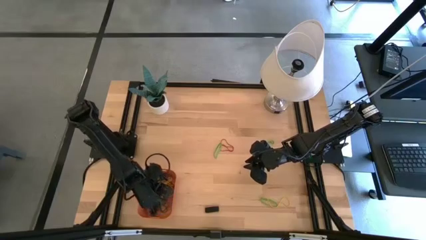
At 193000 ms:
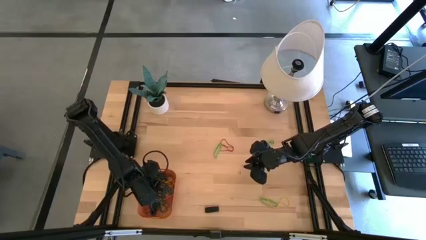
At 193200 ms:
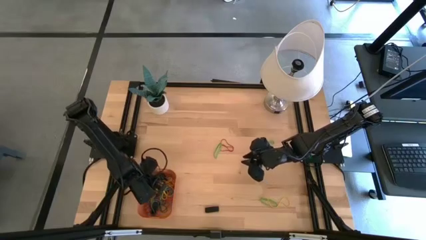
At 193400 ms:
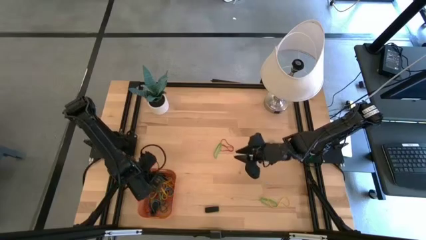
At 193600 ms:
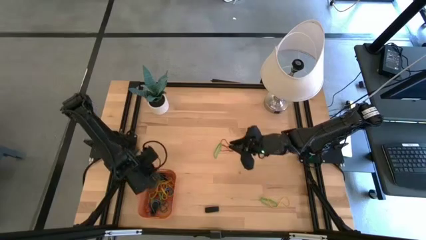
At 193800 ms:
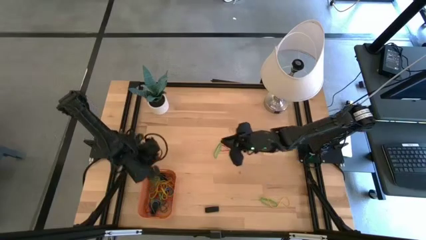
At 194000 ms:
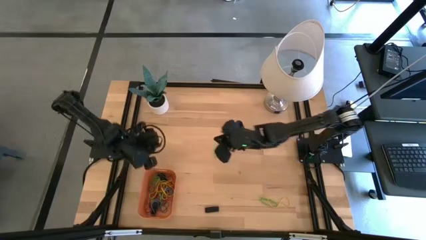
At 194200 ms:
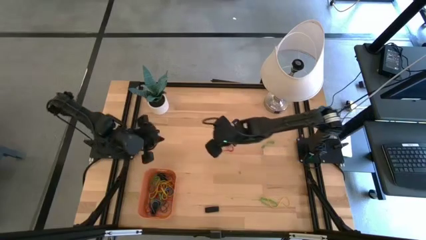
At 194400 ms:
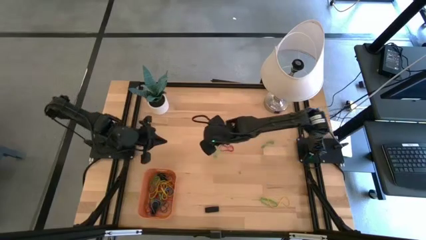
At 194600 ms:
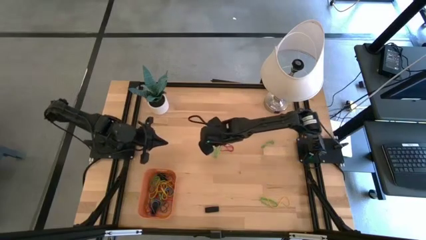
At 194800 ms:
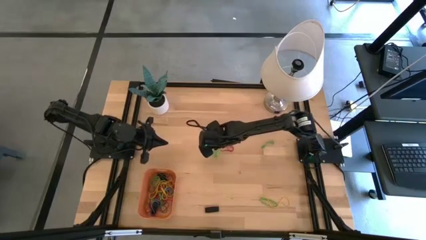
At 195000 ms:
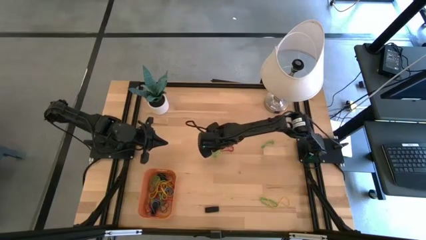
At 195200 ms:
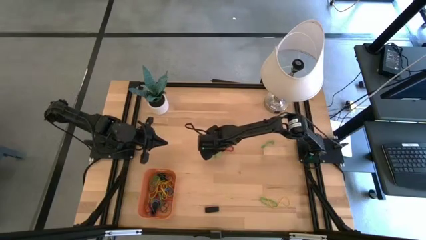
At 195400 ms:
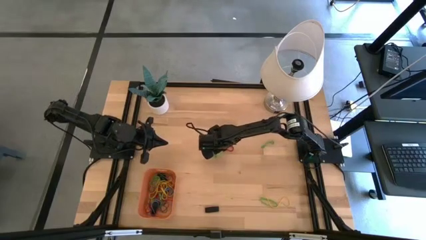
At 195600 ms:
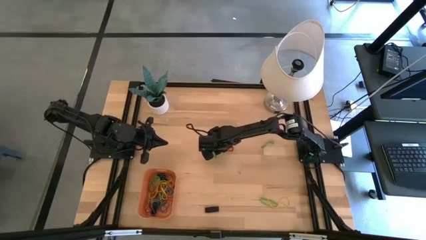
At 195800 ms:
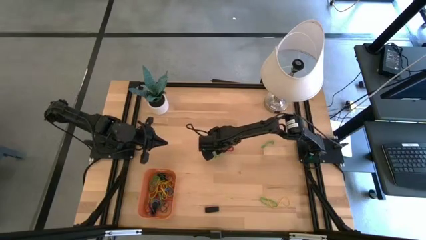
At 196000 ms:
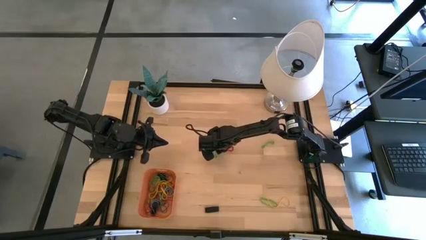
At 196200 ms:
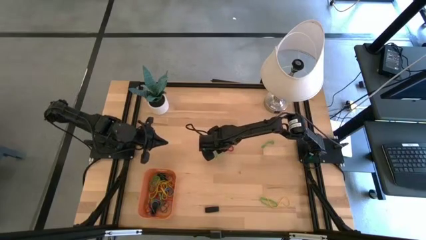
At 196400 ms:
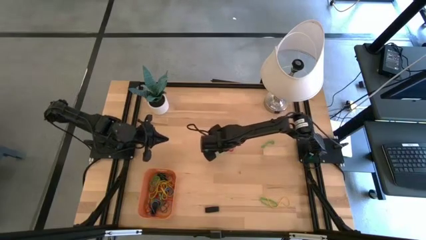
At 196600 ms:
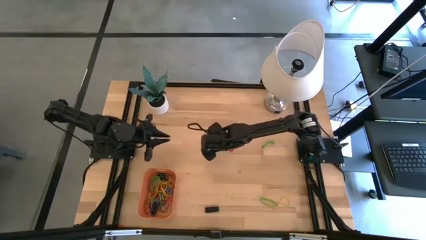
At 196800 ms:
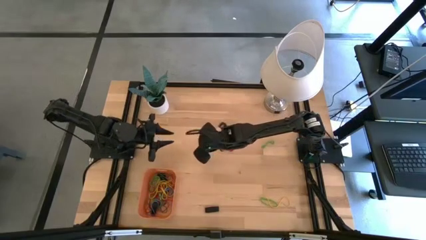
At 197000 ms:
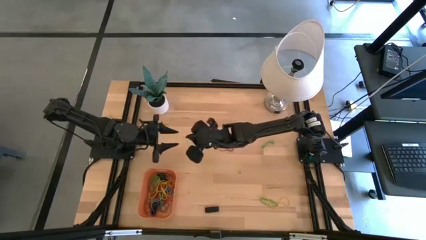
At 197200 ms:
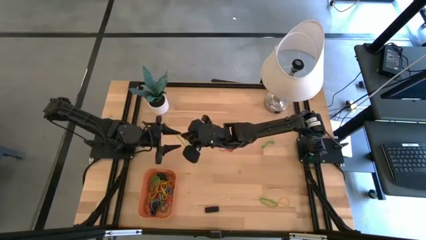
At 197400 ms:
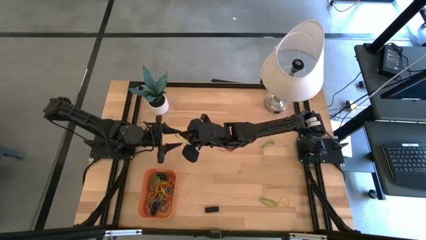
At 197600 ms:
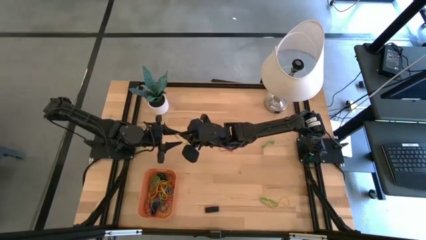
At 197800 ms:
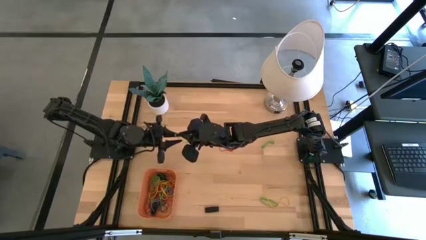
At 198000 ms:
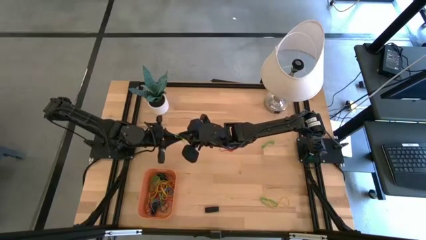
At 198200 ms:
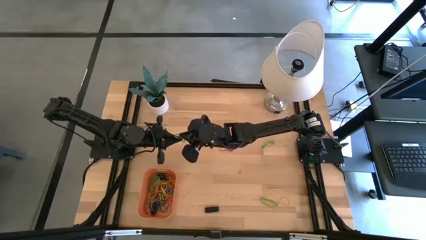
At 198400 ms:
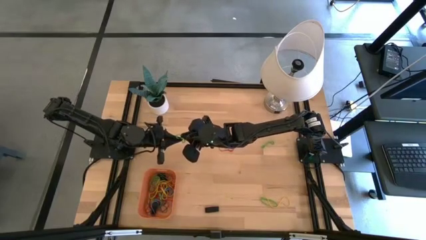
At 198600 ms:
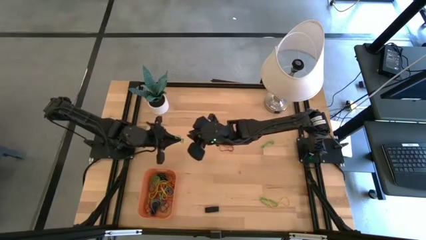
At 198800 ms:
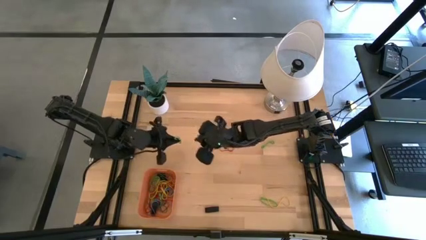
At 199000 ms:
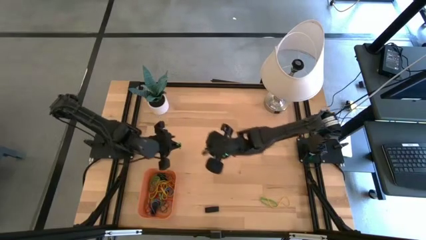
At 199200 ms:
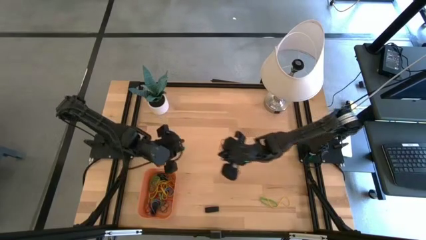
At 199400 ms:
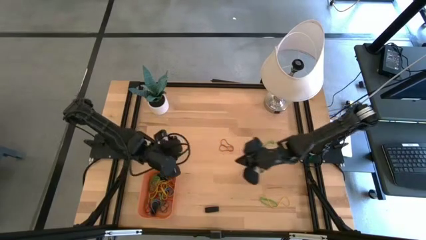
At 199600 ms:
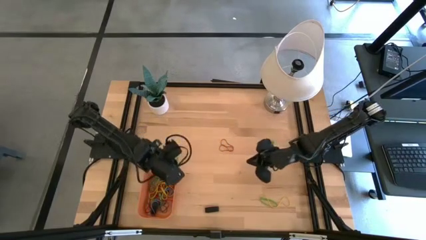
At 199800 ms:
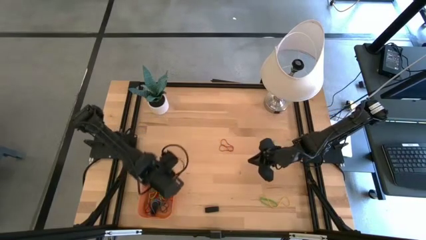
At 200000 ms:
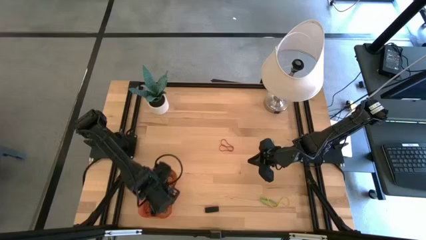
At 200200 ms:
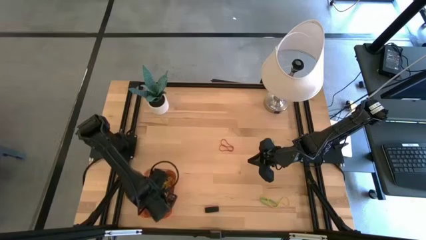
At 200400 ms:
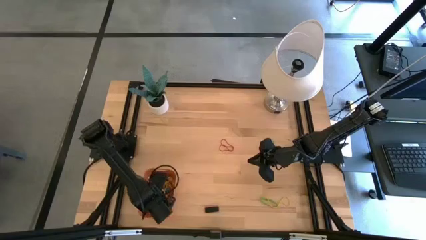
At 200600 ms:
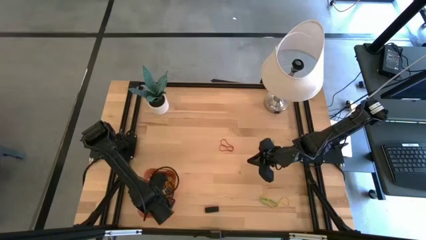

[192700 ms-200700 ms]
Task: Pick and place rubber bands into bin
Put the green rubber band into the orange bin

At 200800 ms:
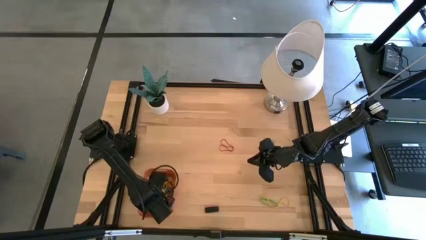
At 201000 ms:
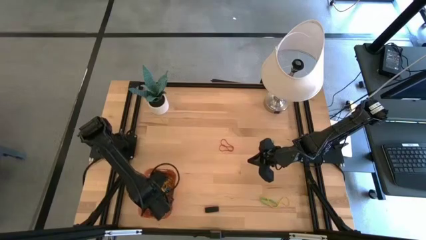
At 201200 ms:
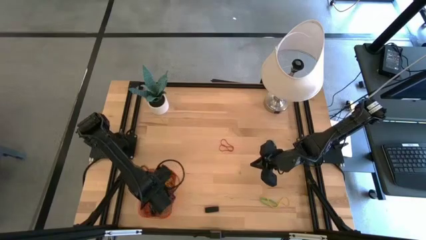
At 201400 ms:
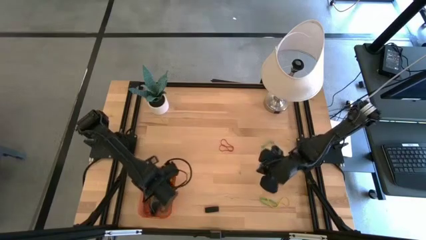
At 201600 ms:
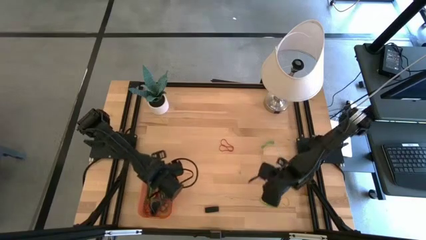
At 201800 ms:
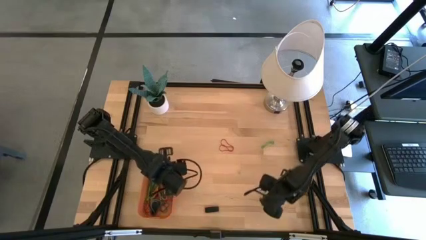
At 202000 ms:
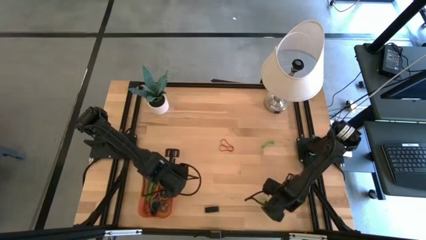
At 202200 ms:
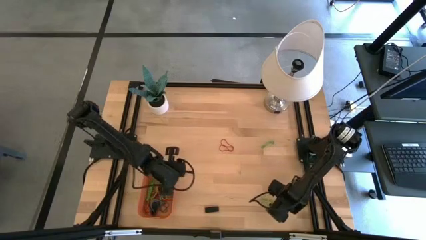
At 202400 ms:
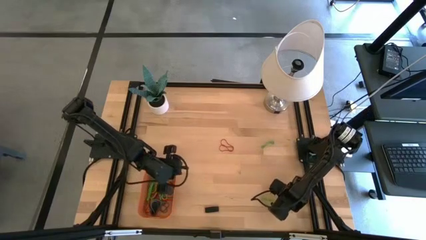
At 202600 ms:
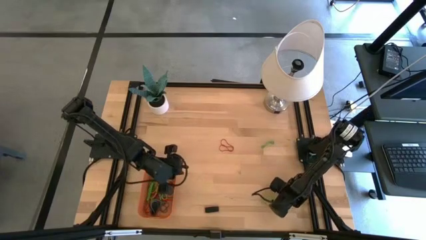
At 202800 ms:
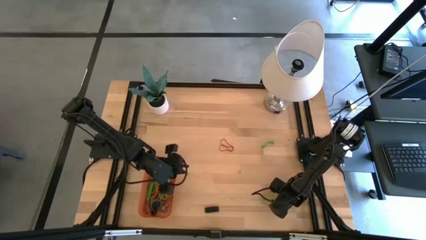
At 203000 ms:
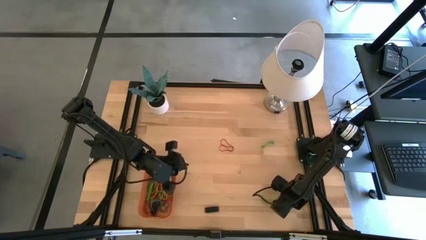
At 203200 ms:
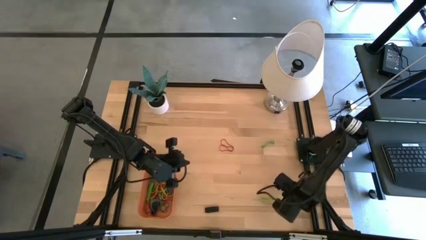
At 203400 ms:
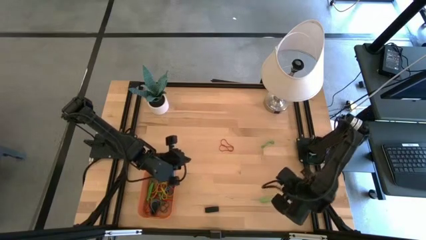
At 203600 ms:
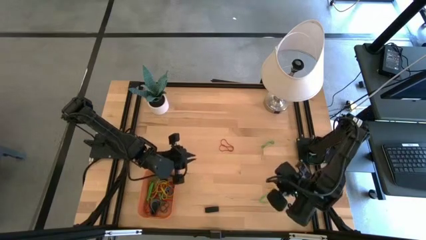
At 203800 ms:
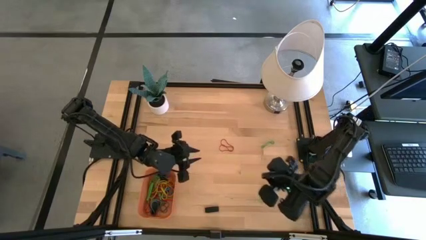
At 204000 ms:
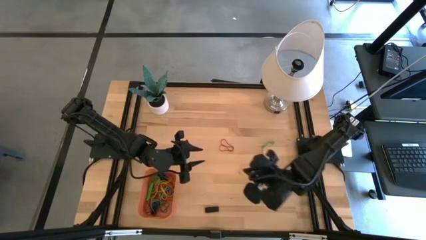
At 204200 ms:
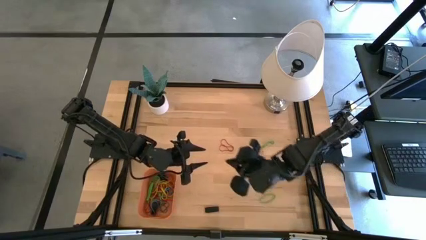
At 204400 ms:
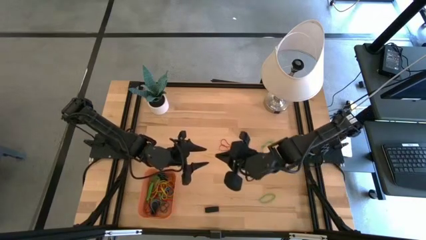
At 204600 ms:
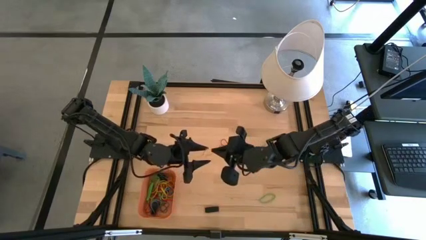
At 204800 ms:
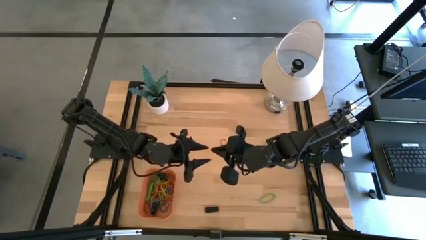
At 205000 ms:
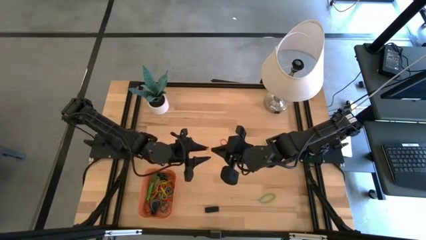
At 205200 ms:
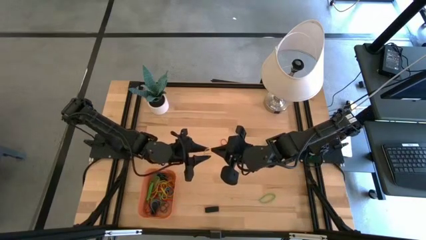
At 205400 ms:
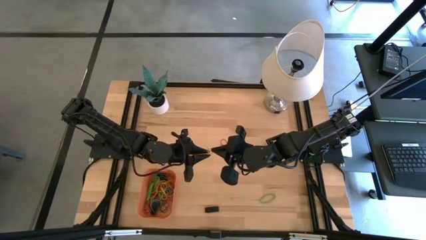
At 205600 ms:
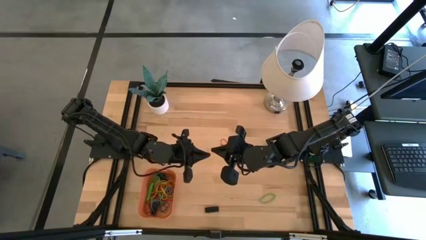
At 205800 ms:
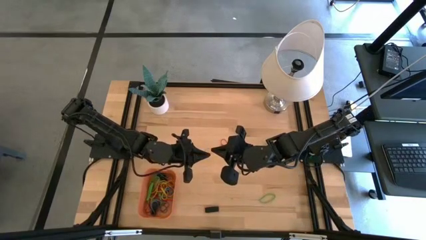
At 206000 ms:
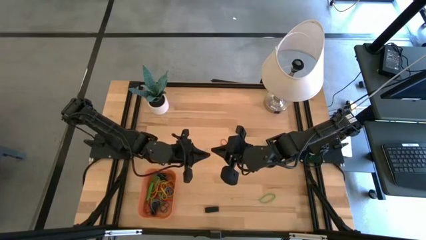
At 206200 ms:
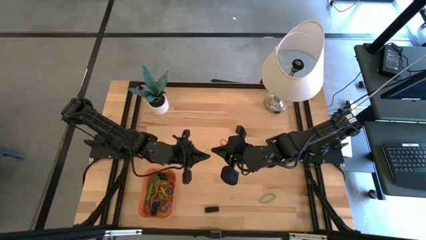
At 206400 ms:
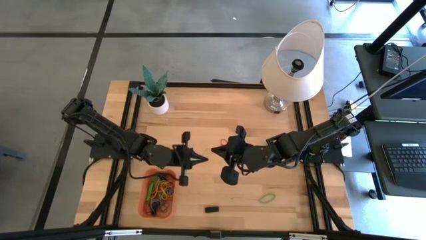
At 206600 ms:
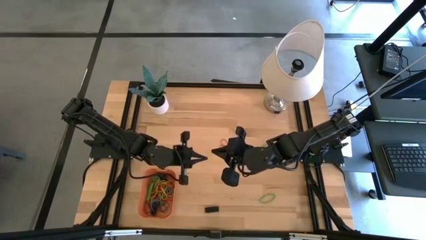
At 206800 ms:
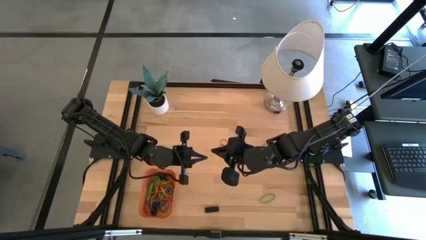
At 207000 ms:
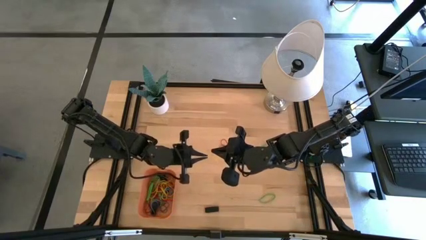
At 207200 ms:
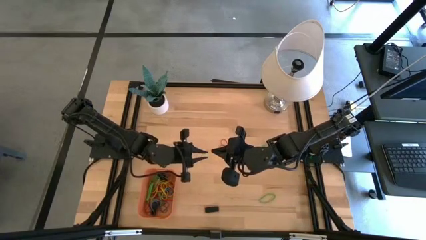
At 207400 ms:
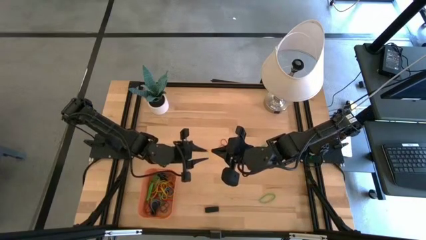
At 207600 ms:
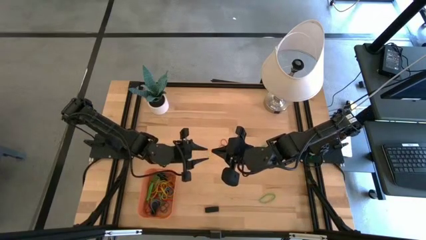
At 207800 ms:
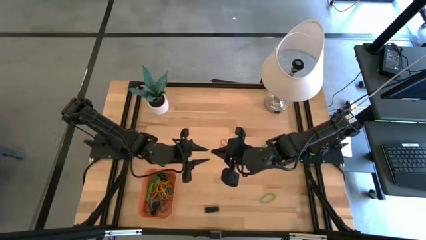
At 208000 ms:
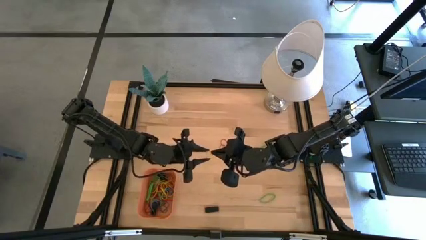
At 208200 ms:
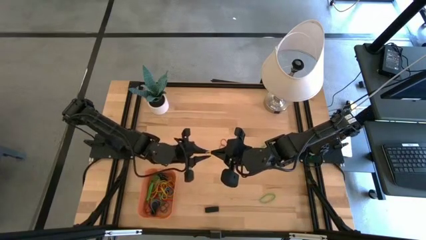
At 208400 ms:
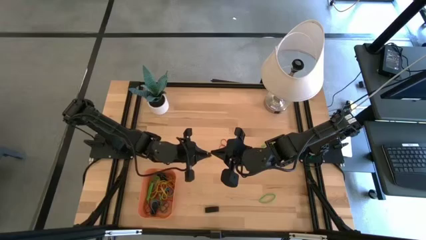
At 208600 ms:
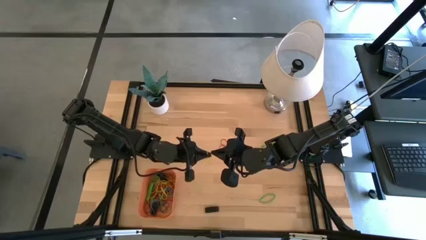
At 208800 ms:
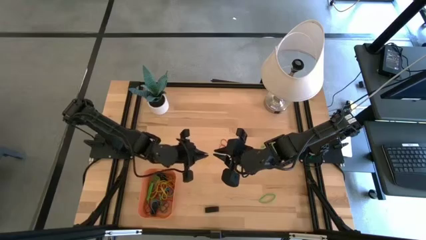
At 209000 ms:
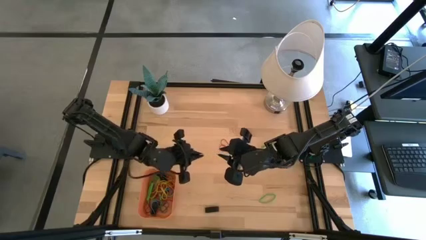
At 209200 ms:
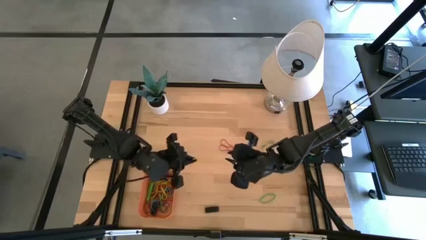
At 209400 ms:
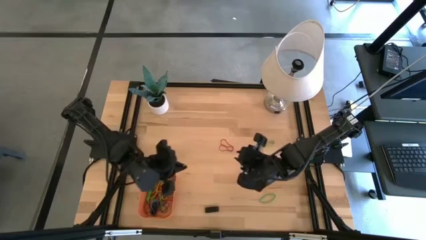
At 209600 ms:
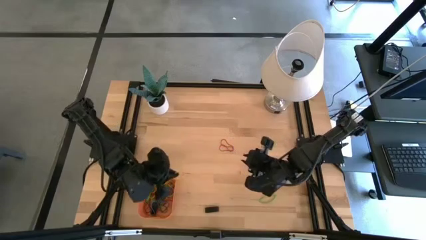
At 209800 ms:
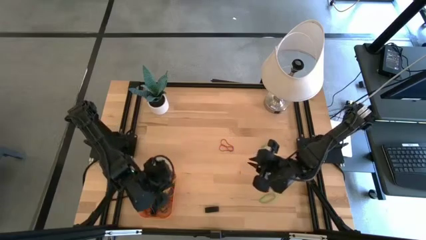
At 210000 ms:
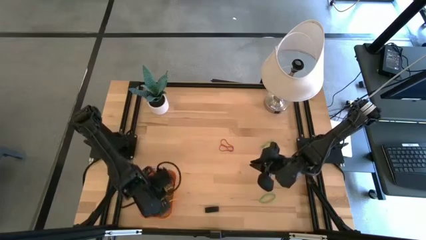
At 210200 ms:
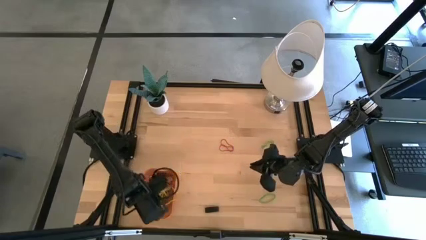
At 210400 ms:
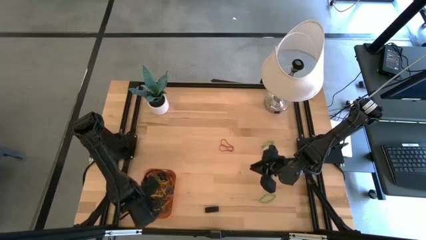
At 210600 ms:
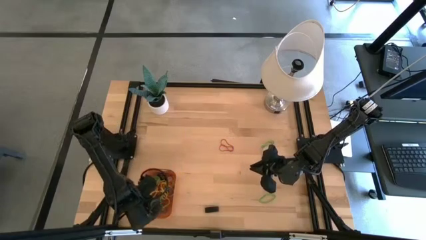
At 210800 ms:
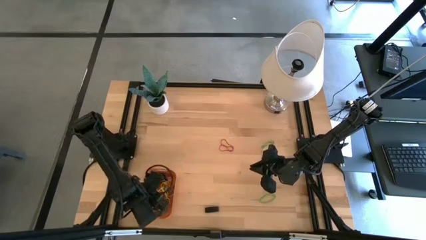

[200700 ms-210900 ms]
Put the yellow rubber band into the orange bin
